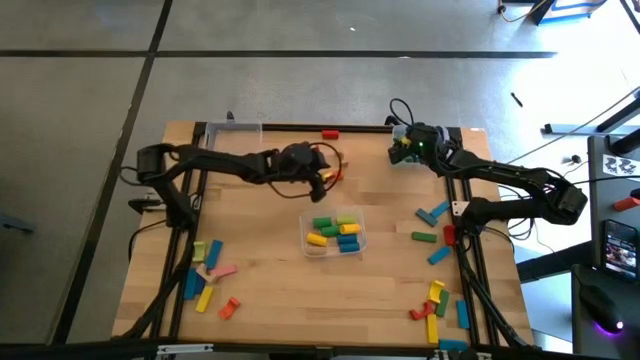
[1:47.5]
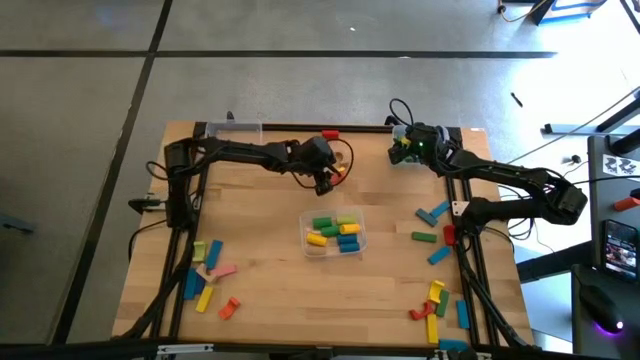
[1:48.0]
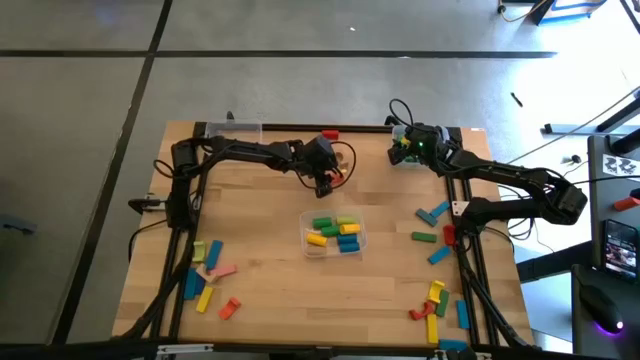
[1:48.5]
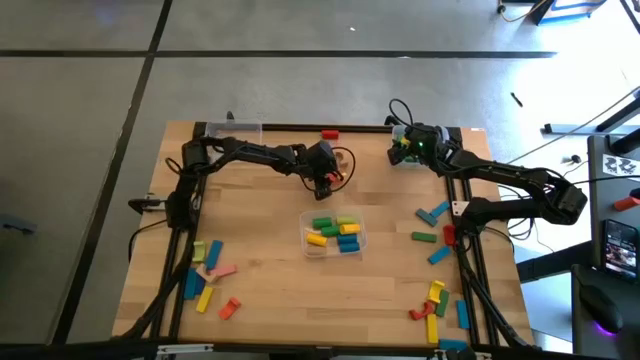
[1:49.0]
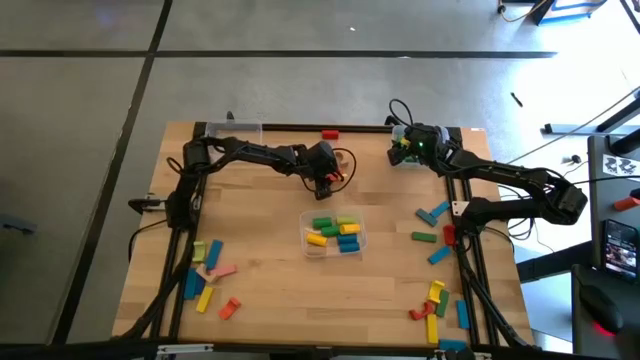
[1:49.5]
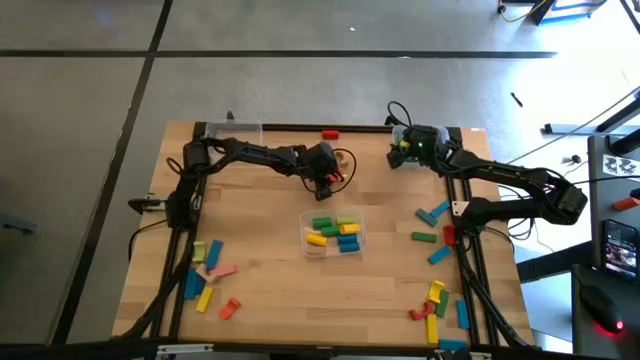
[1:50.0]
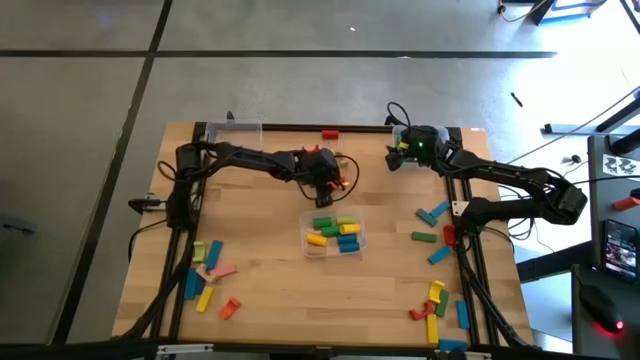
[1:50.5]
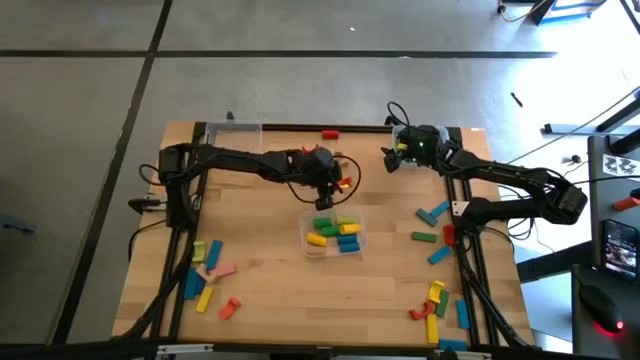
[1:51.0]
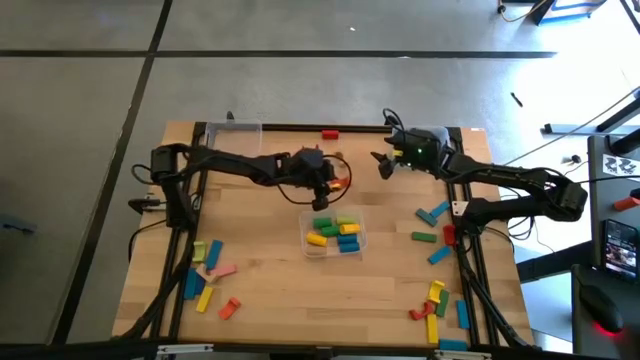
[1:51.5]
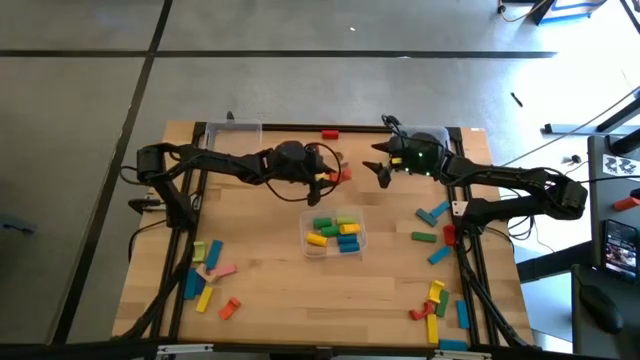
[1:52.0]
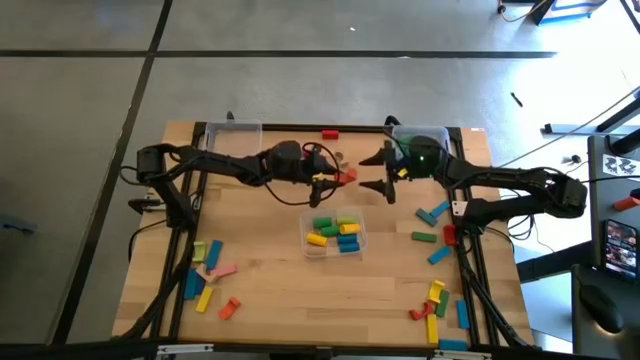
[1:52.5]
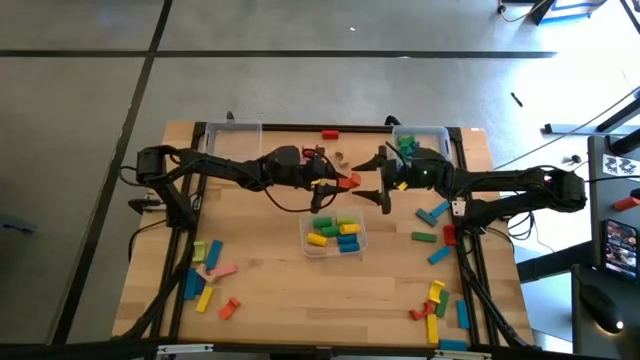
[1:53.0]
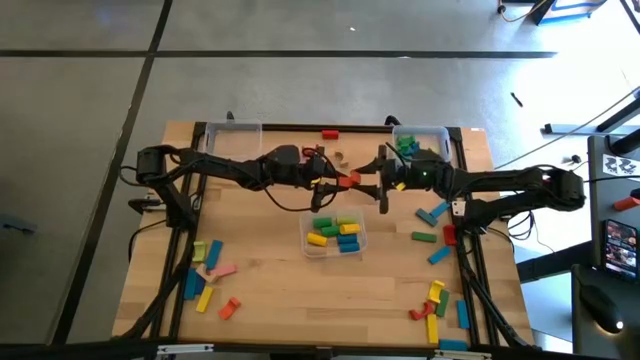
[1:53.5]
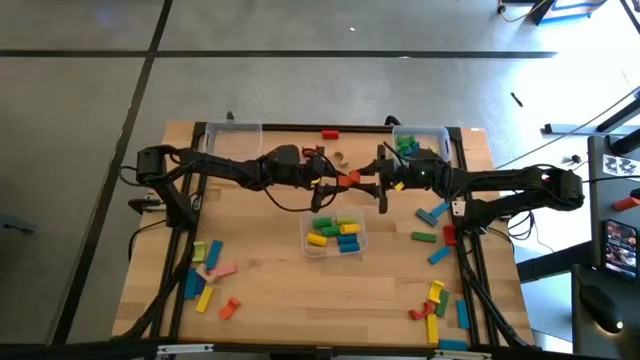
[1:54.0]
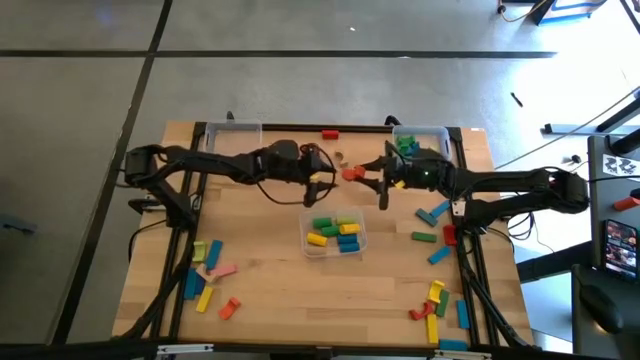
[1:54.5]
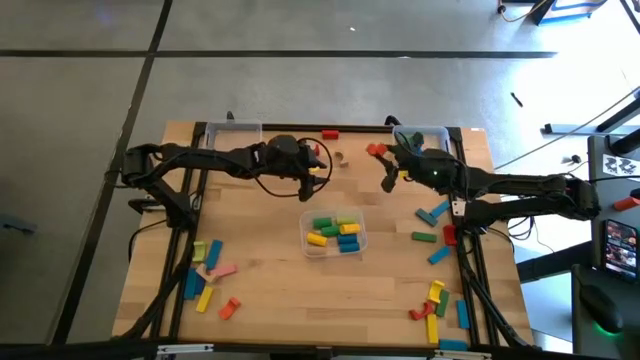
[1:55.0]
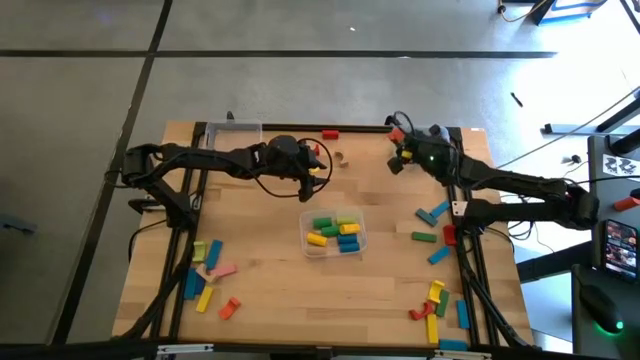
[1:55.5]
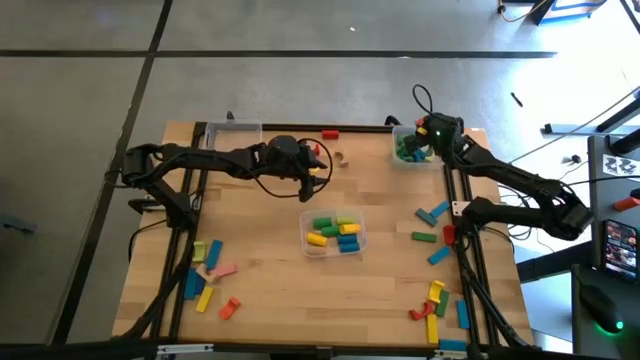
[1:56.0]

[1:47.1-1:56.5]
Task: Sort blocks by size
Put the orange arch block into the top right transparent bin

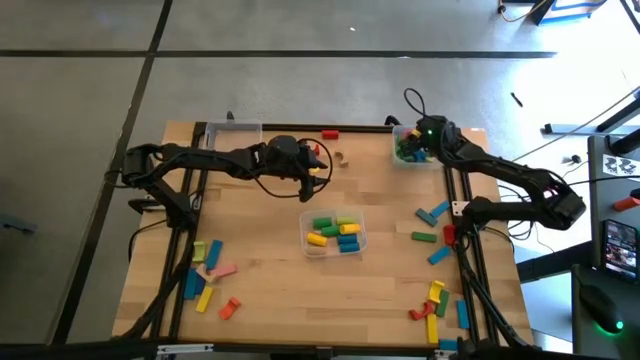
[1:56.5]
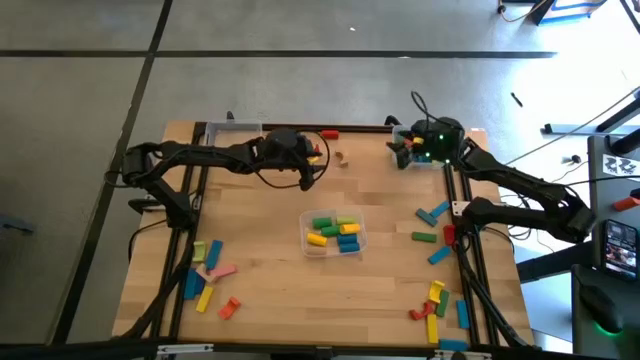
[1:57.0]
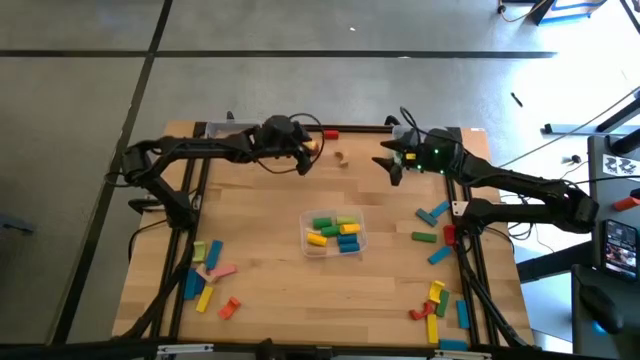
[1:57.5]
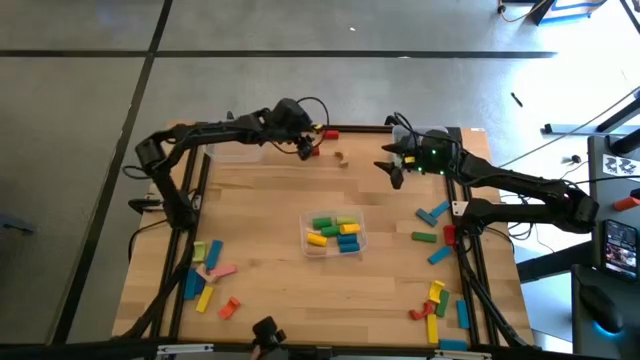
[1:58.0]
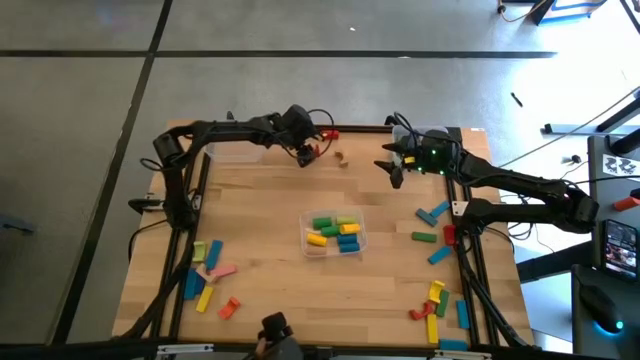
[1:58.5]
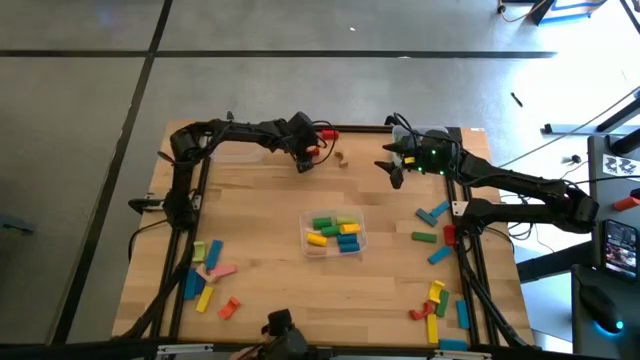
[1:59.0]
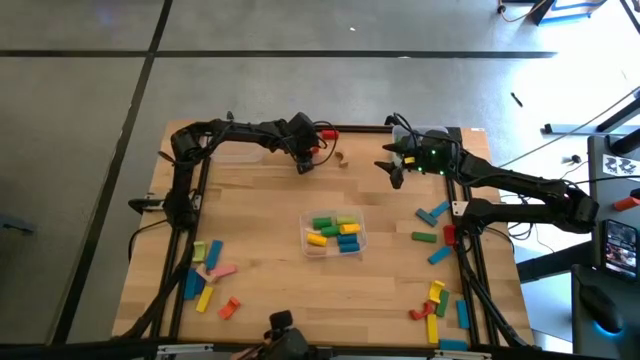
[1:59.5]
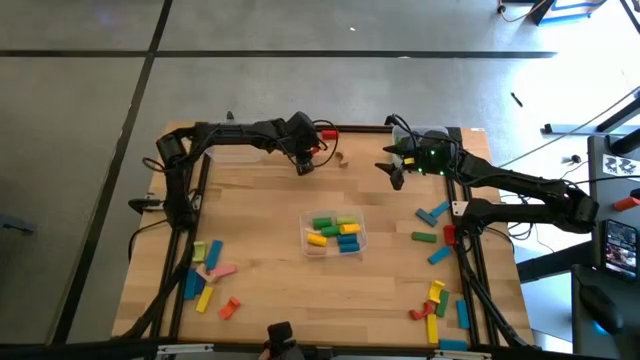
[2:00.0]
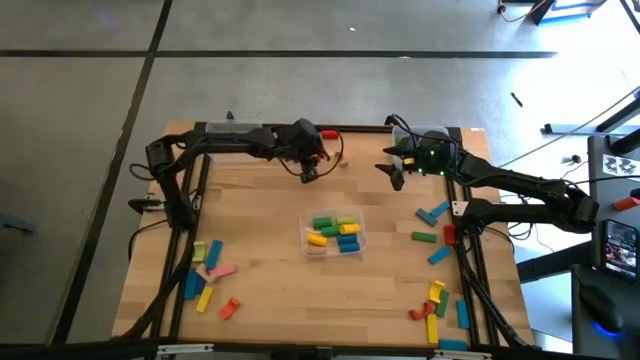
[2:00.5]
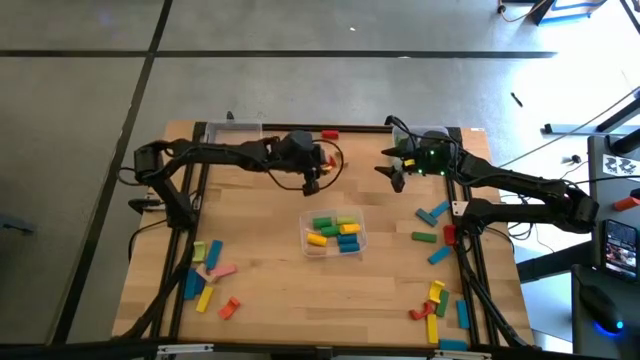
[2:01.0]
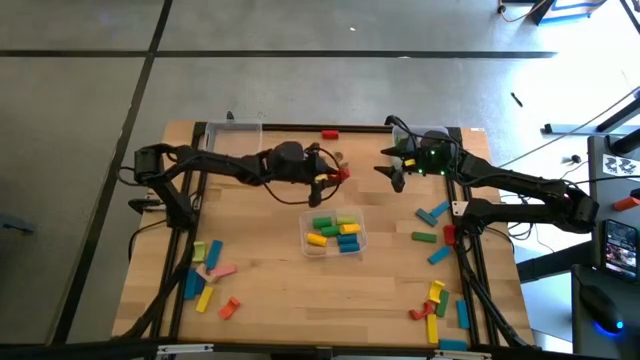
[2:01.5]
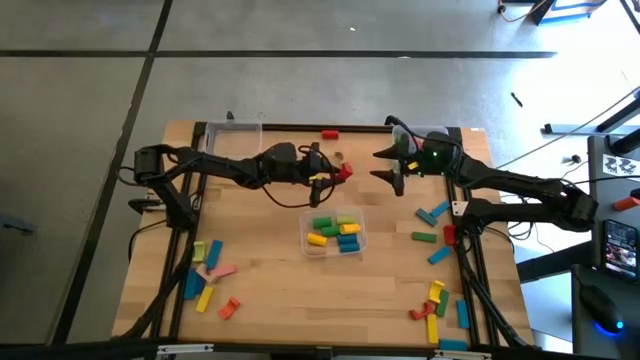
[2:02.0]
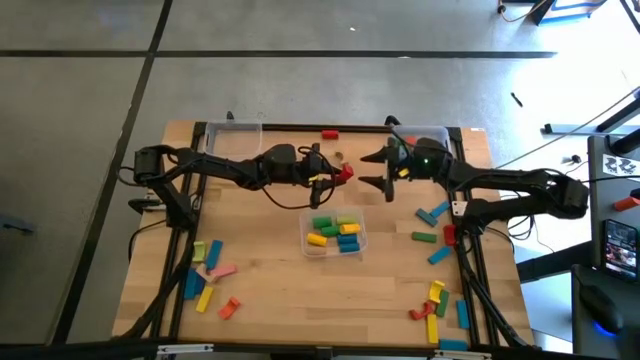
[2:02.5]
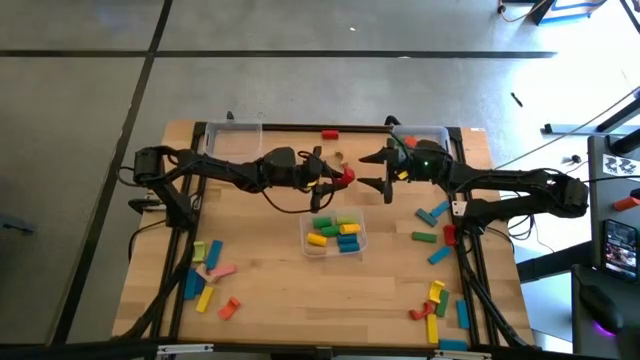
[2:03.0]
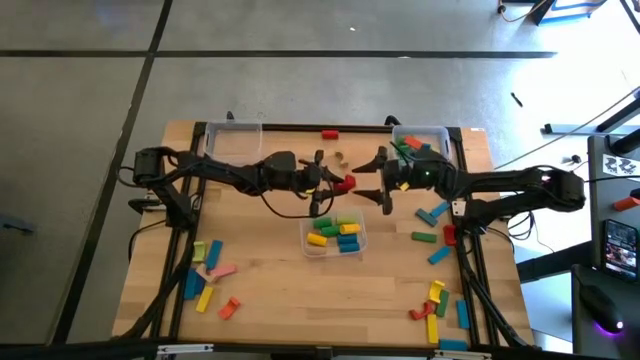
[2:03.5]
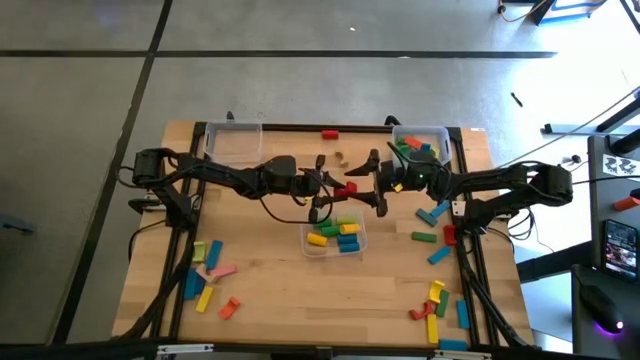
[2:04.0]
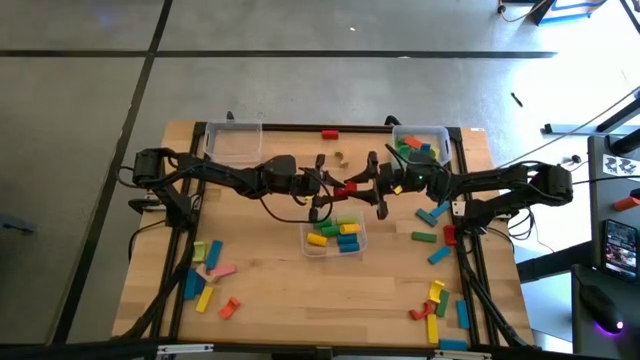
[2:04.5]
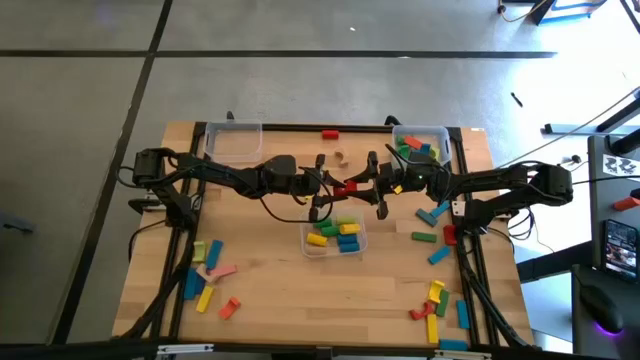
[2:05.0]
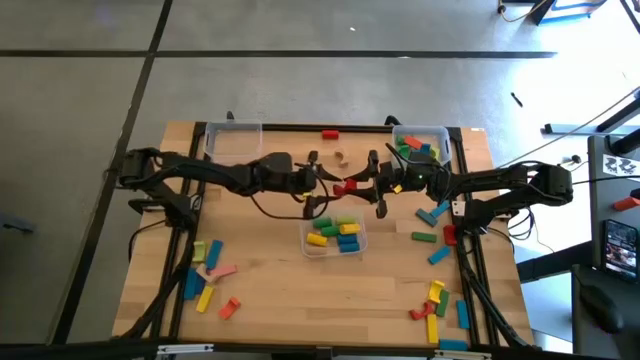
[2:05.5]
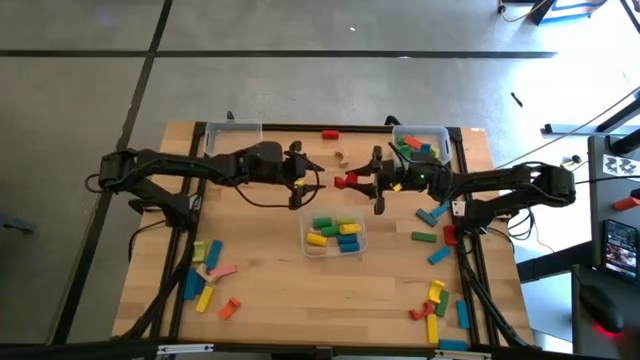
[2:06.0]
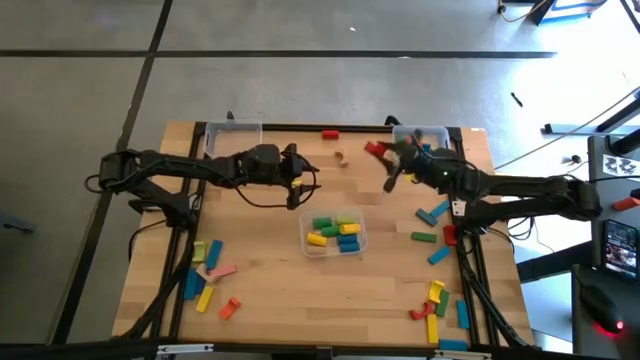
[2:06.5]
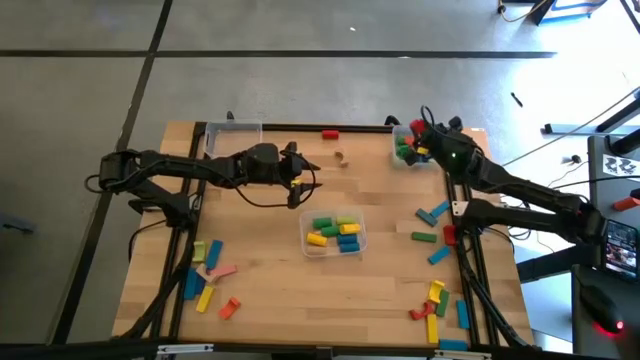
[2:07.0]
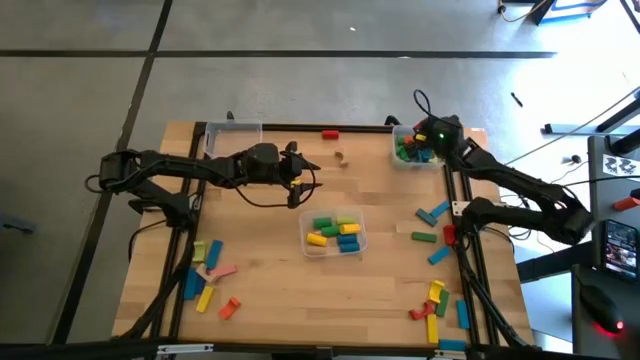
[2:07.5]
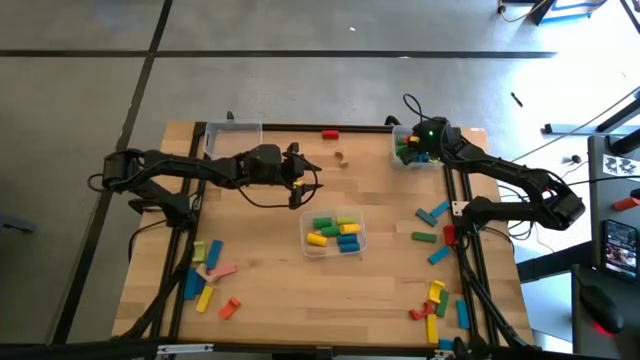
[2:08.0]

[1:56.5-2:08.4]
Put the red arch block into the top right transparent bin

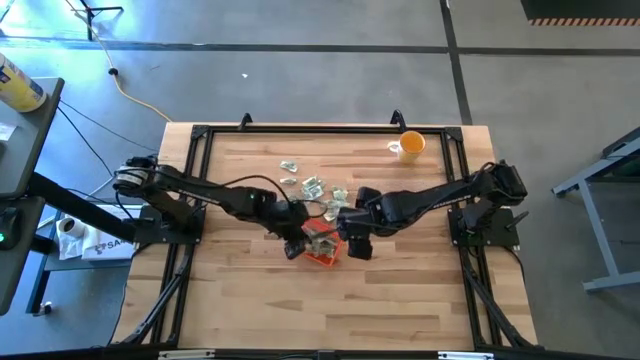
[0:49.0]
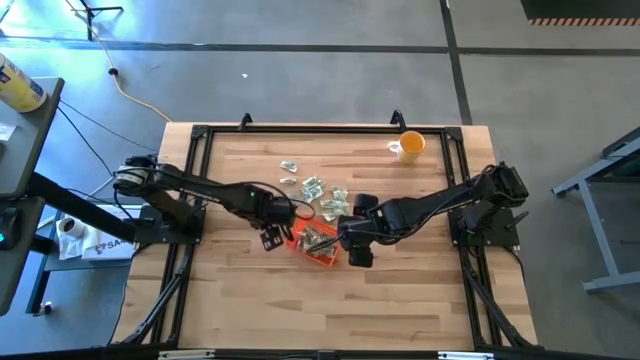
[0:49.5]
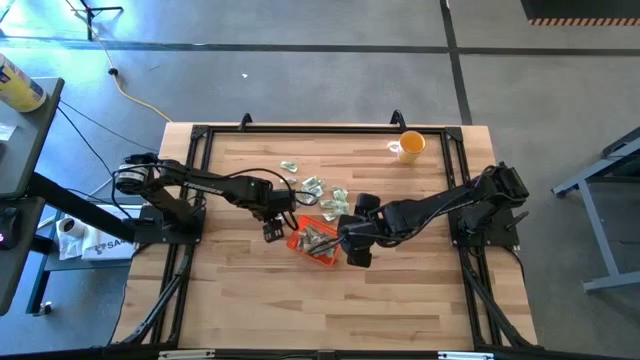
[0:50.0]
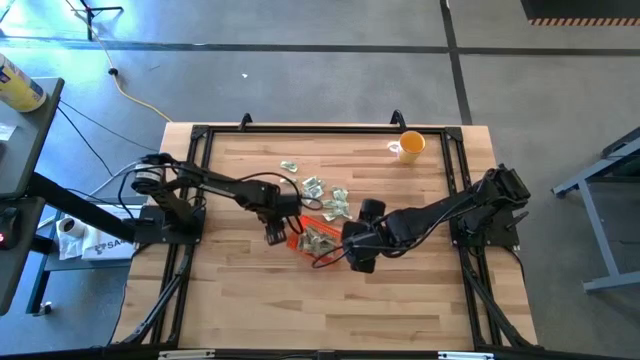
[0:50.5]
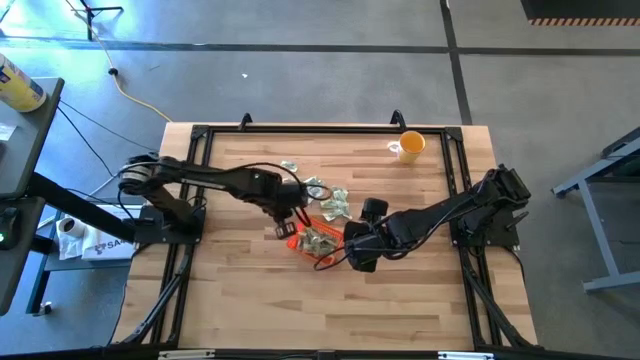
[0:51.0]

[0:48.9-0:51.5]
Task: Pick and place Stevia / Truvia into bins
Put the stevia packet into the orange bin
